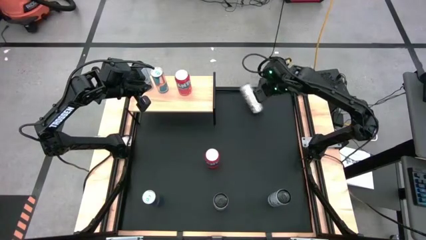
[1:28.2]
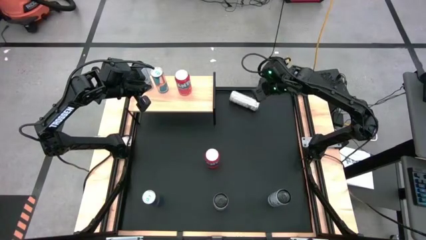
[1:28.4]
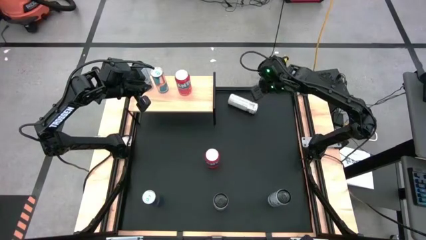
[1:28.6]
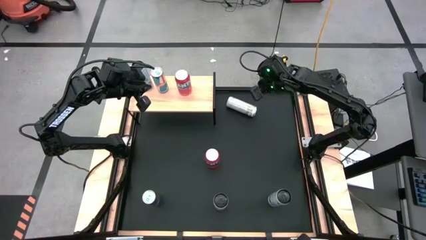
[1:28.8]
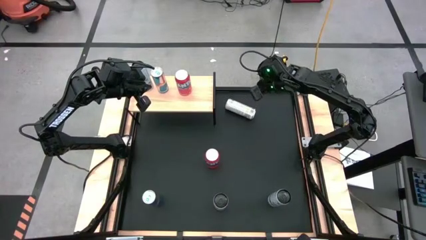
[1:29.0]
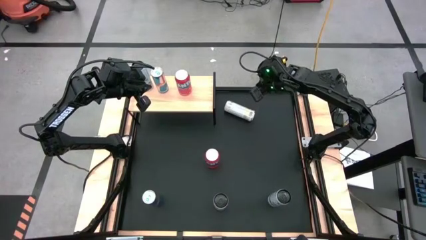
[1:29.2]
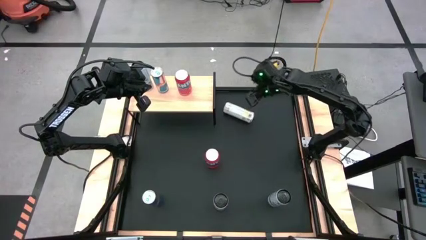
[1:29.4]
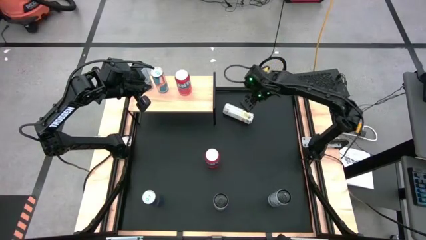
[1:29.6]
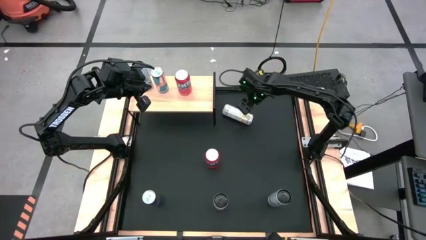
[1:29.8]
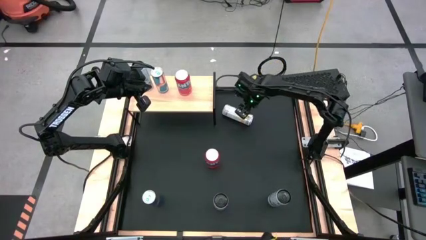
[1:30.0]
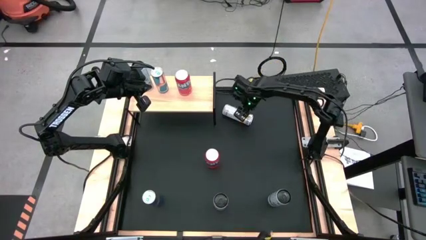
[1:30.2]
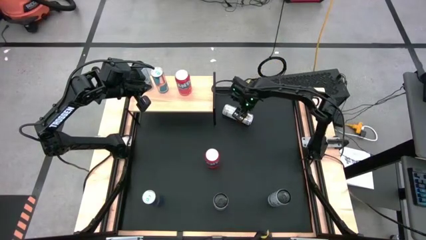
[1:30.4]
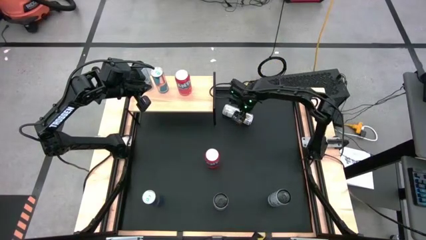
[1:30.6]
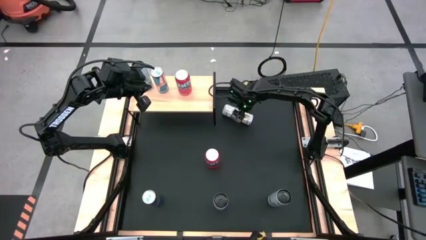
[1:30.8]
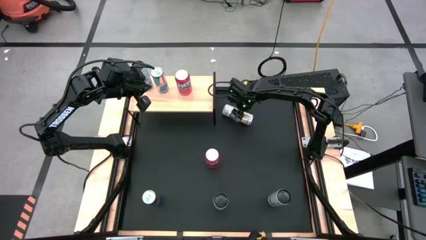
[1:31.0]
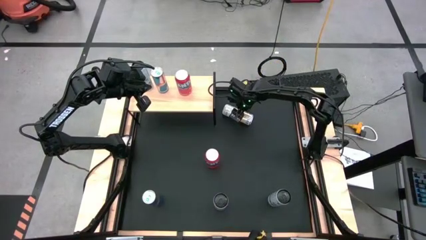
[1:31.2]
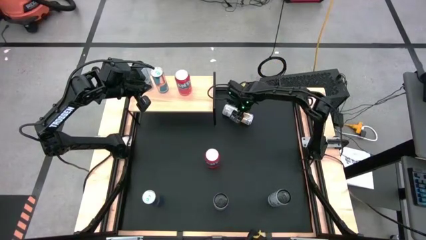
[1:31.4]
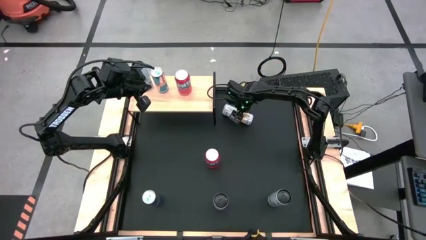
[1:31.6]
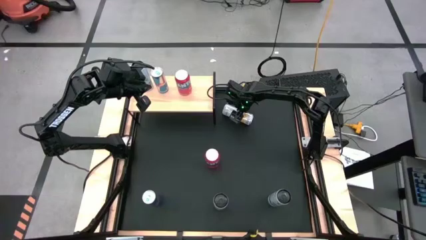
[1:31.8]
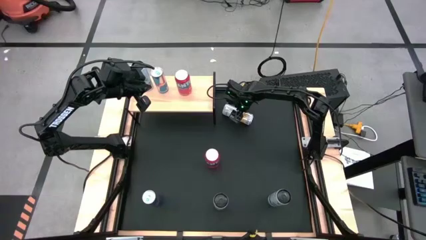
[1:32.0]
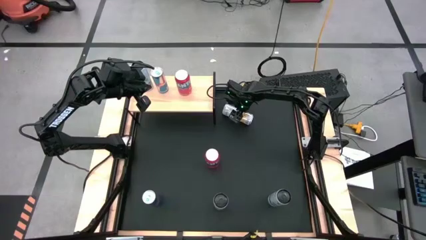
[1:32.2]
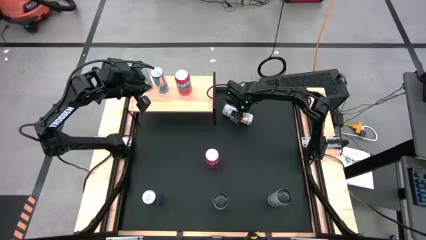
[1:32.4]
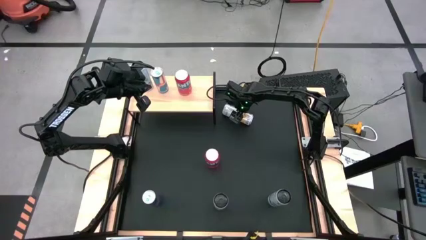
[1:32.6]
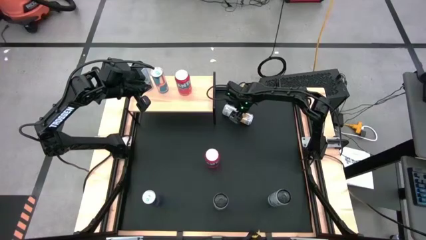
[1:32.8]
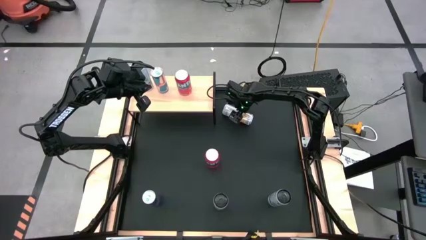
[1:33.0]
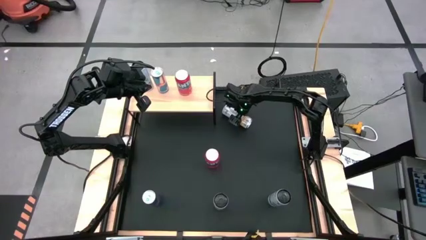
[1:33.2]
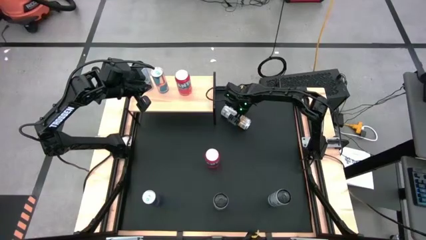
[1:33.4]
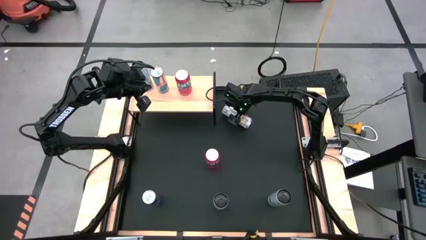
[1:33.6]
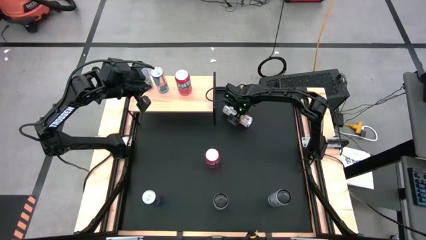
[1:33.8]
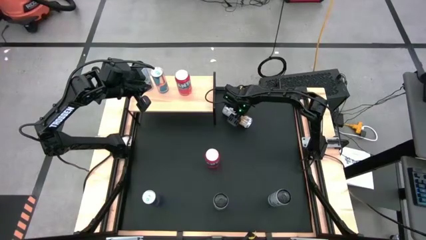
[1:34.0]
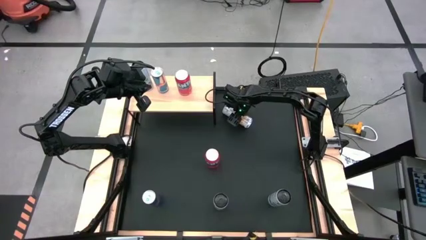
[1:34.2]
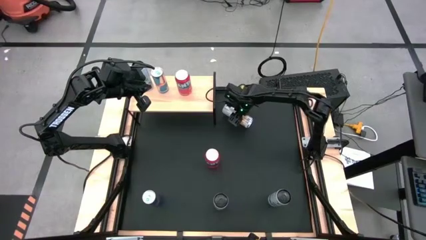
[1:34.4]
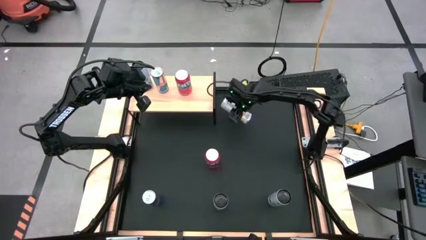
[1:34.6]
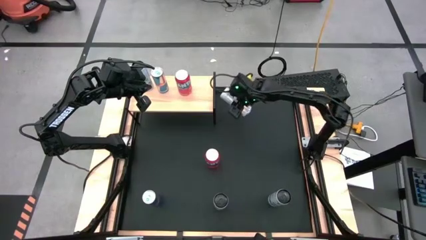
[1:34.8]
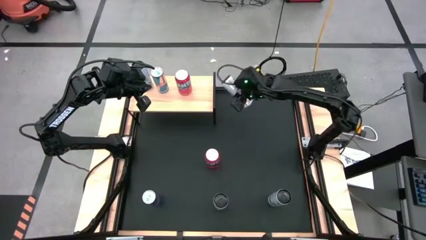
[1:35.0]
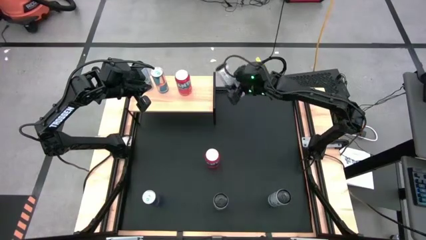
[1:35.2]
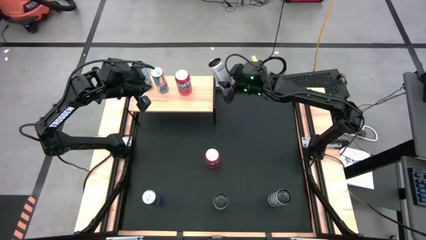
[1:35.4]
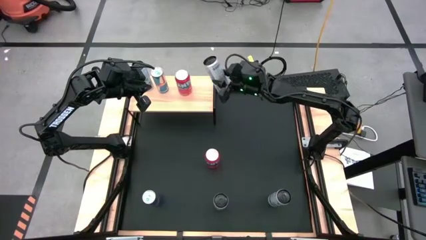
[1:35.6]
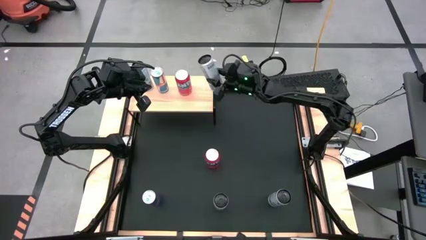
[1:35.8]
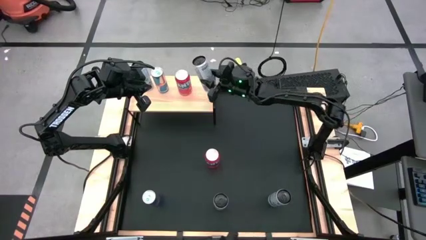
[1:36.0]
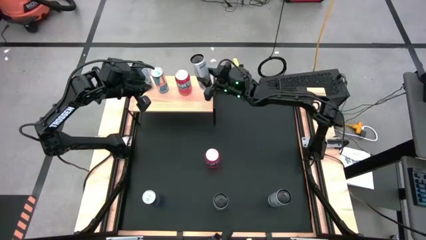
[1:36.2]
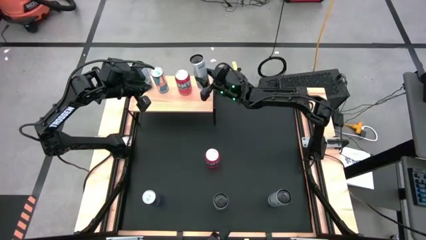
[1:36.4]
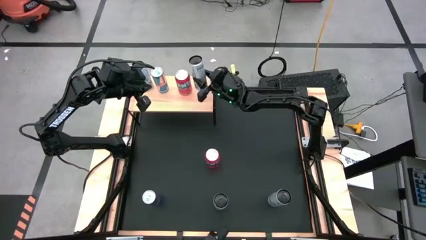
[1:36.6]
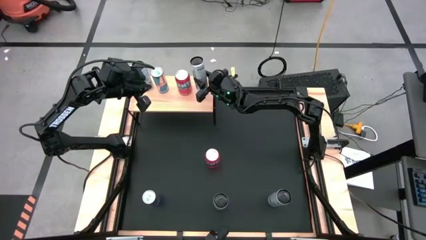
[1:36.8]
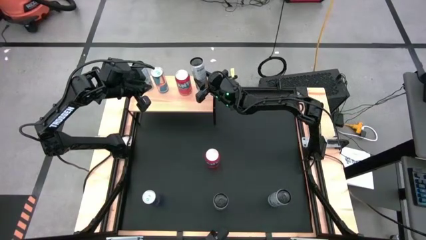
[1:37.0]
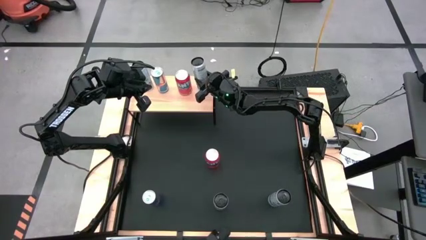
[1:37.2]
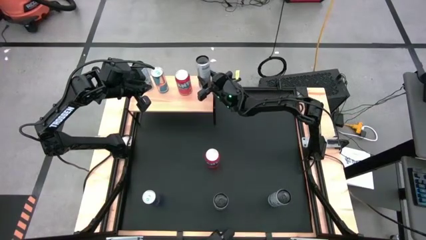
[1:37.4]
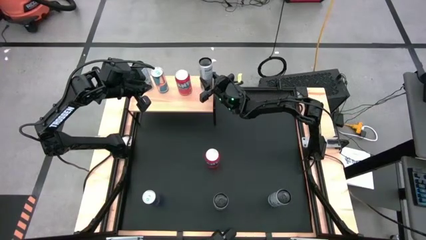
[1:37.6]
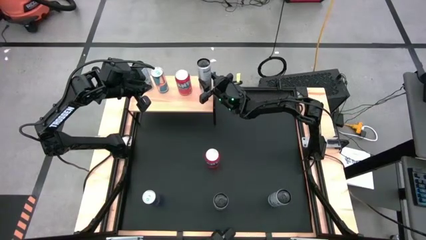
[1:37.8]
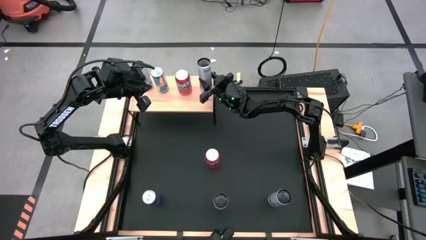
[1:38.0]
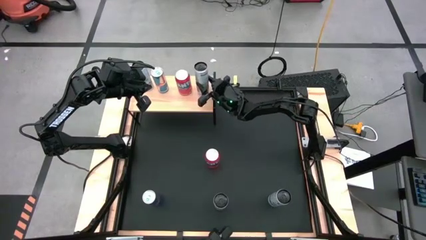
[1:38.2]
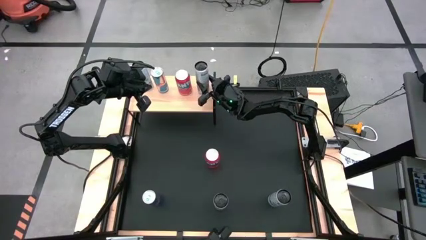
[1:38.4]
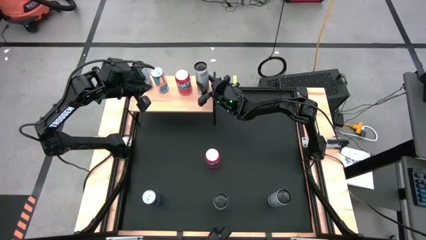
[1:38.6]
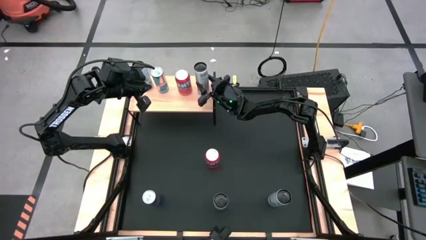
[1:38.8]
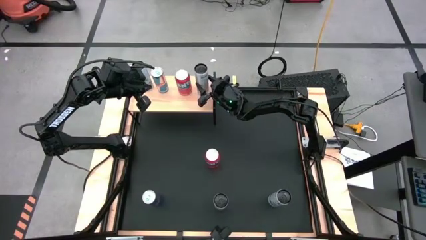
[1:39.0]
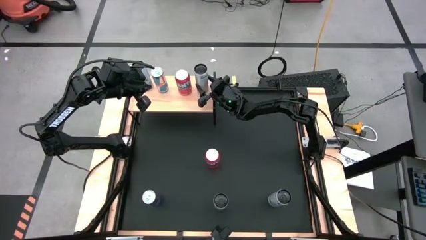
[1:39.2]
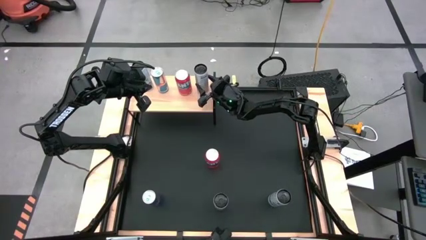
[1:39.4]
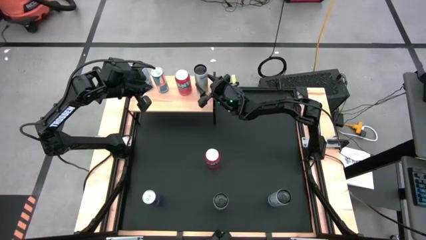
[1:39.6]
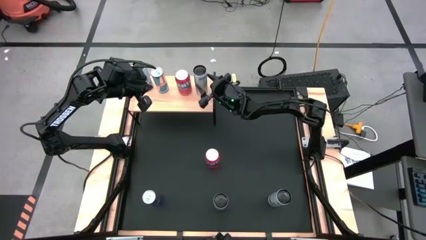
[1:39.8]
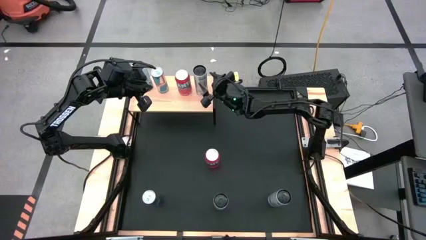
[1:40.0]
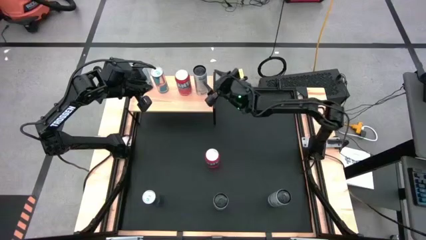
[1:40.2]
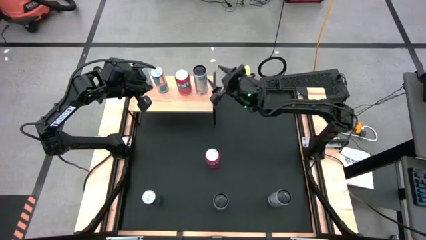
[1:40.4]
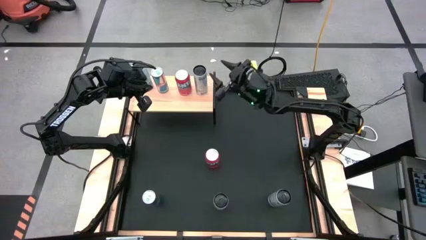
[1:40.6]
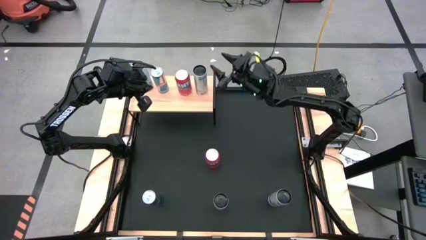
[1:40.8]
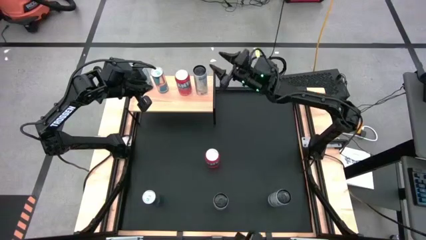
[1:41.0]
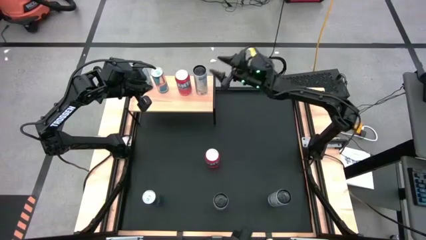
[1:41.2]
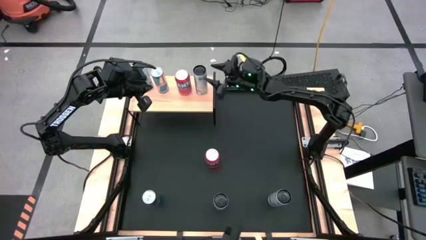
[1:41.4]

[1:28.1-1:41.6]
Task: Place canned beverage on shelf
Put the top white-yellow soda can on the shelf
